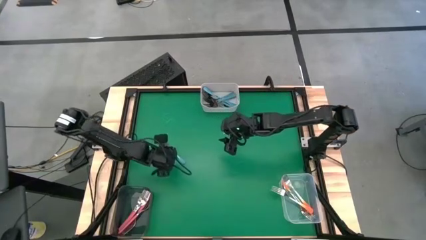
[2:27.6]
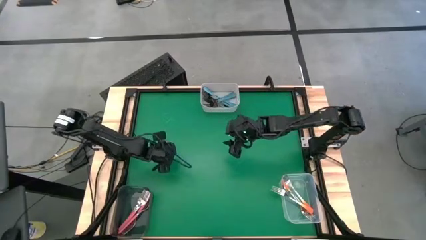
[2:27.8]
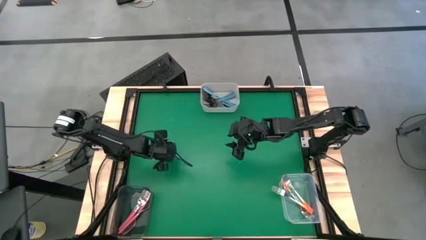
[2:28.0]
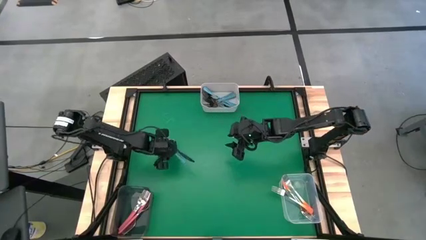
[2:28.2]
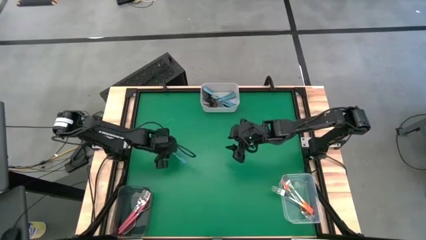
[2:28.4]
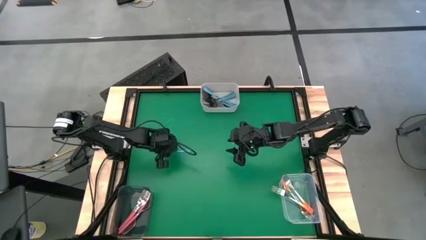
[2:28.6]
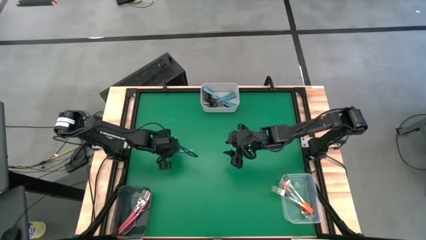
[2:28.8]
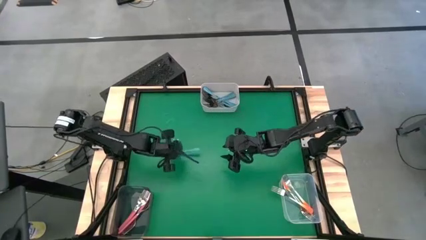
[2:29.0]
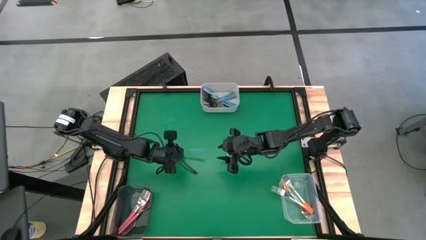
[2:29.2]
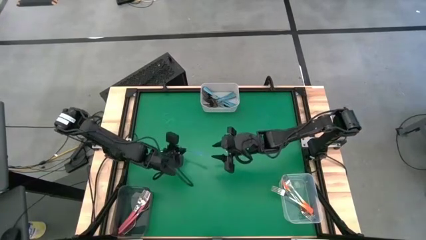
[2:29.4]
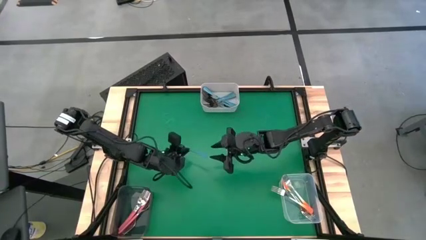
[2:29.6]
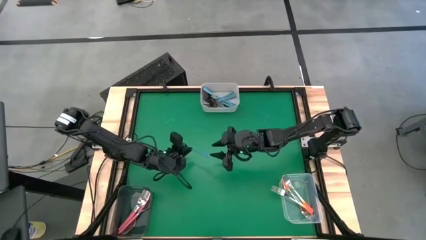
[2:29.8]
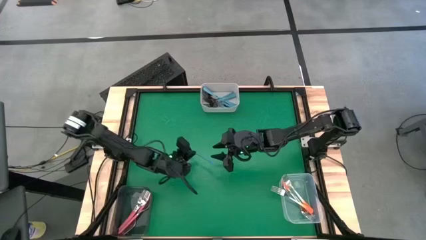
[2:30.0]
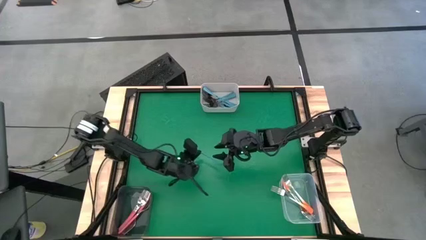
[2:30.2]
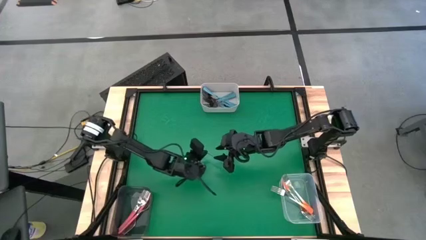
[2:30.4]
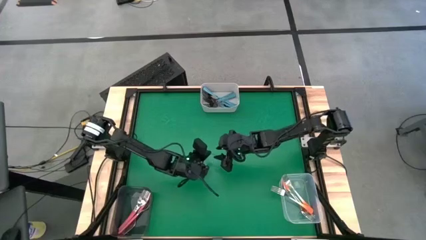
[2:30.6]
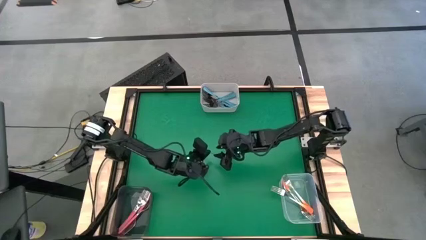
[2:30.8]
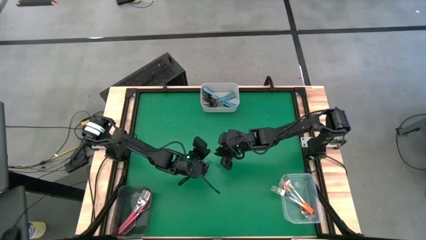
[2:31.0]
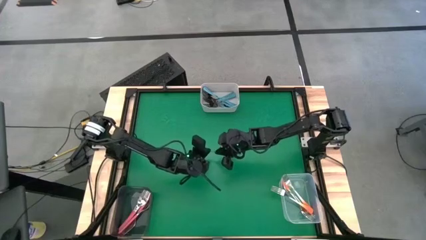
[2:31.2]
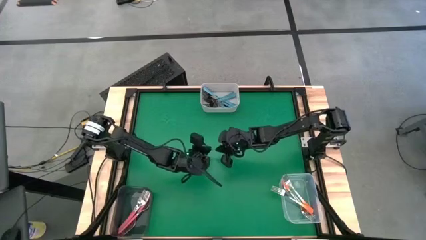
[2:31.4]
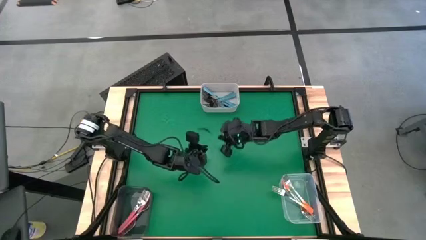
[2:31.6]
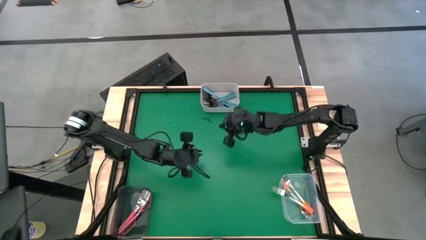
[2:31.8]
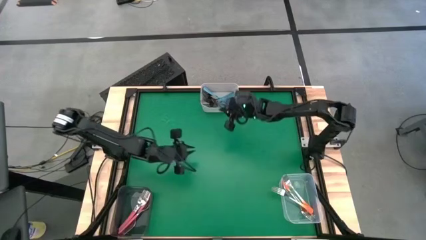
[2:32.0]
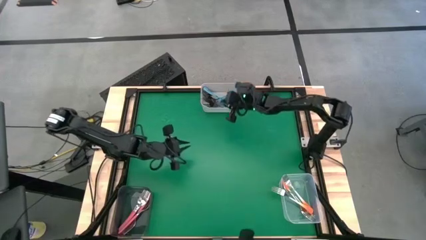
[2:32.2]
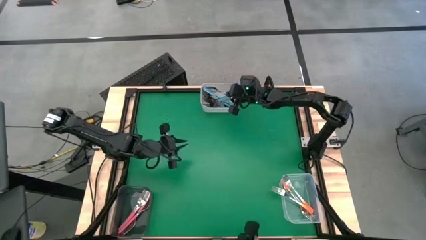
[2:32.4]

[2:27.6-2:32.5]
Task: Sort silverware by color (type)
Put the blue fork into the white bin

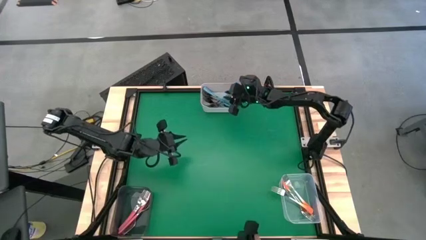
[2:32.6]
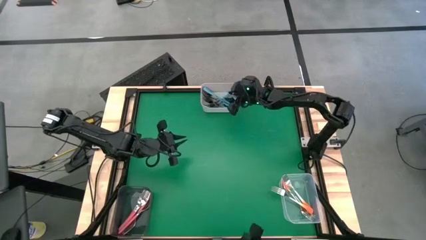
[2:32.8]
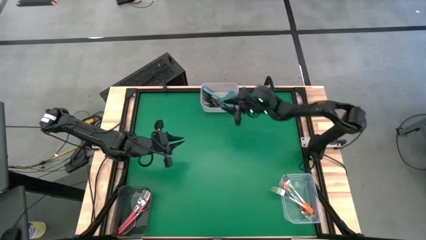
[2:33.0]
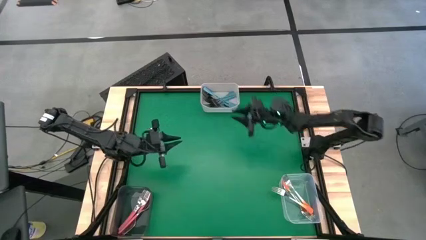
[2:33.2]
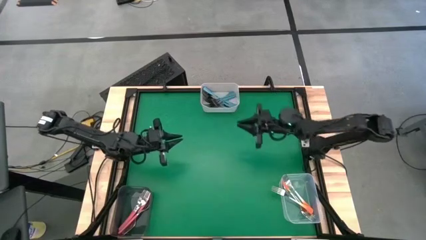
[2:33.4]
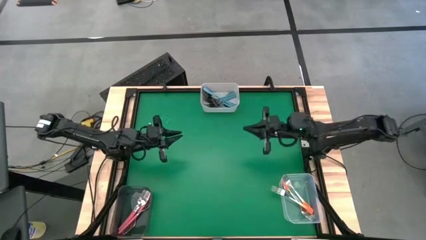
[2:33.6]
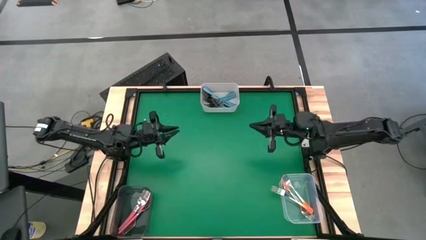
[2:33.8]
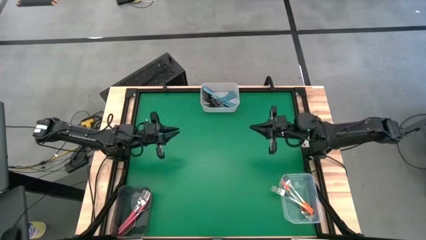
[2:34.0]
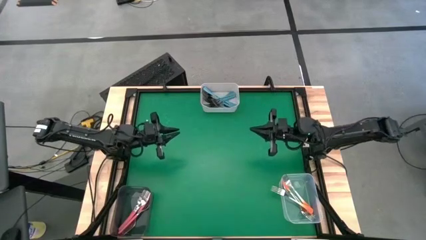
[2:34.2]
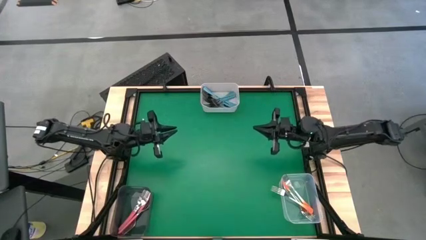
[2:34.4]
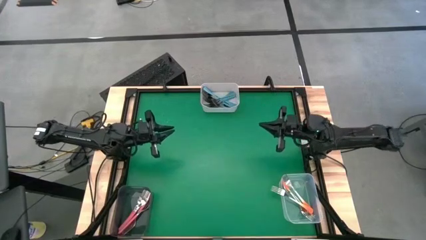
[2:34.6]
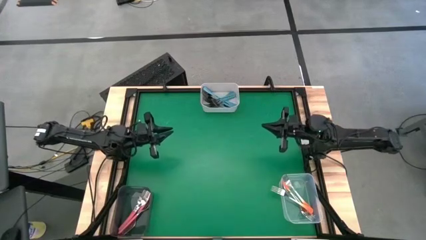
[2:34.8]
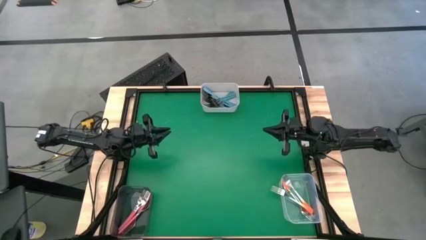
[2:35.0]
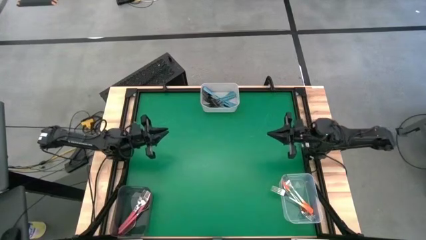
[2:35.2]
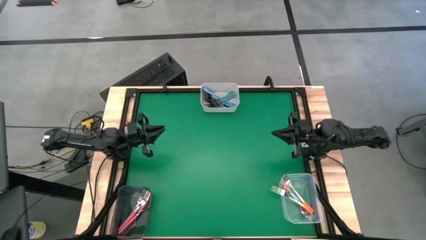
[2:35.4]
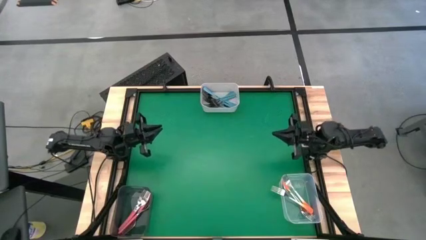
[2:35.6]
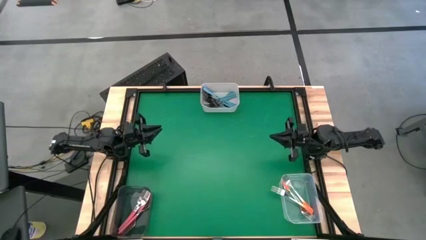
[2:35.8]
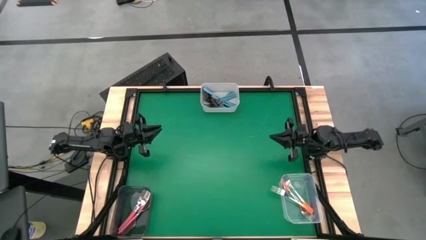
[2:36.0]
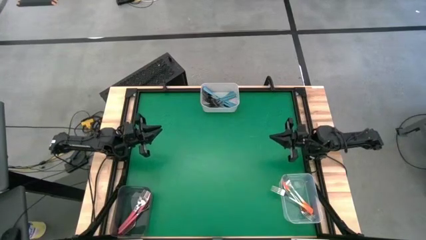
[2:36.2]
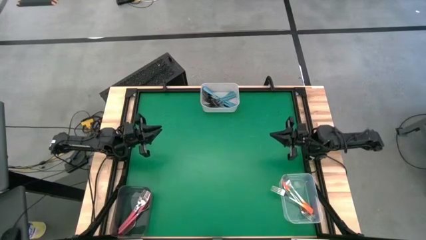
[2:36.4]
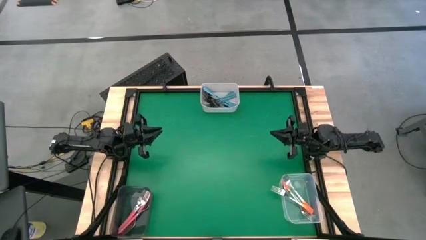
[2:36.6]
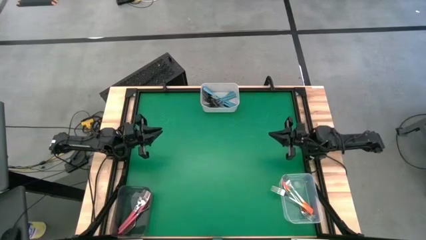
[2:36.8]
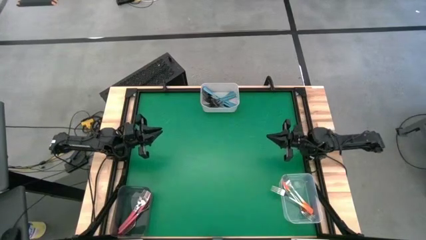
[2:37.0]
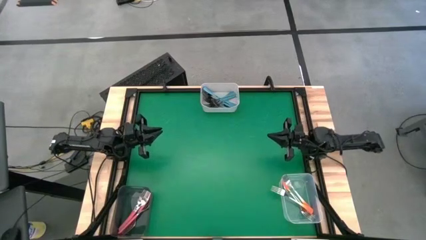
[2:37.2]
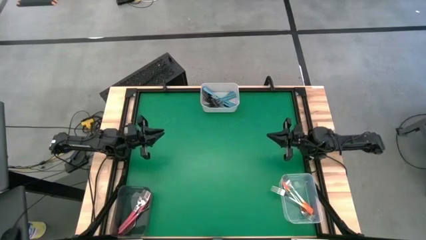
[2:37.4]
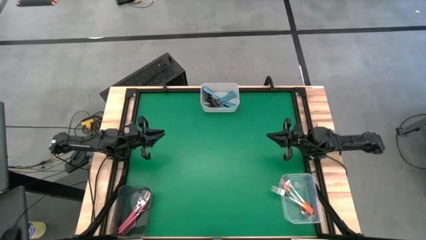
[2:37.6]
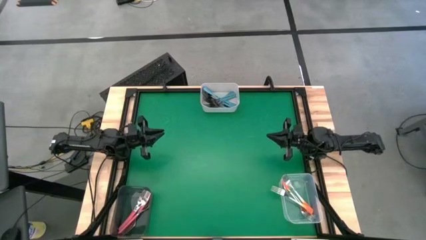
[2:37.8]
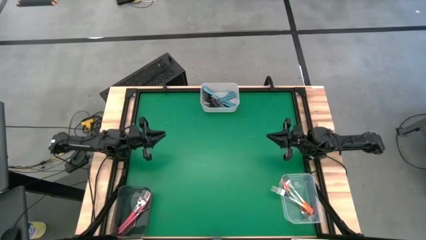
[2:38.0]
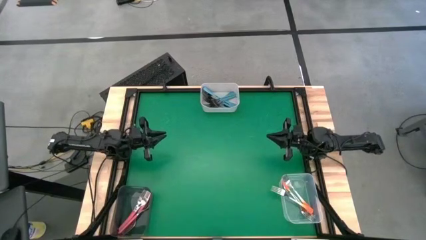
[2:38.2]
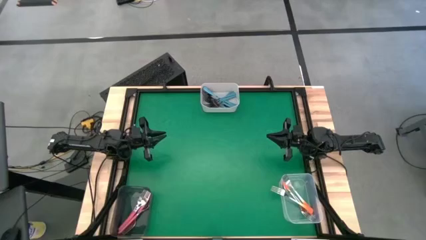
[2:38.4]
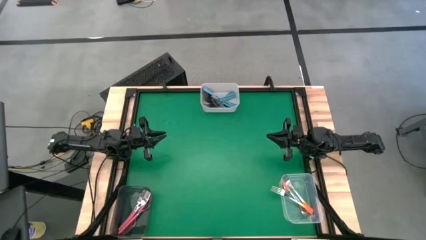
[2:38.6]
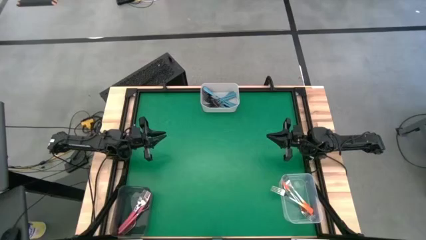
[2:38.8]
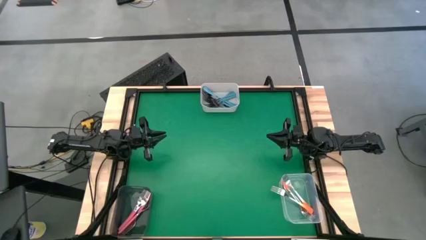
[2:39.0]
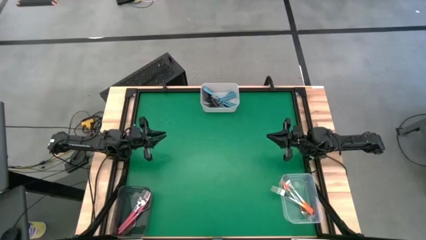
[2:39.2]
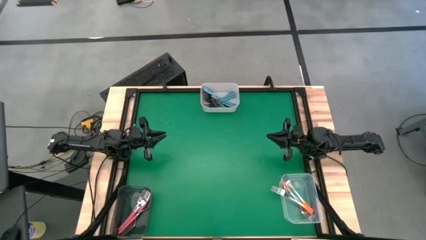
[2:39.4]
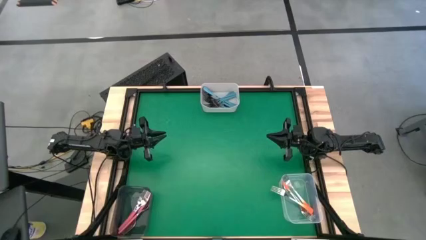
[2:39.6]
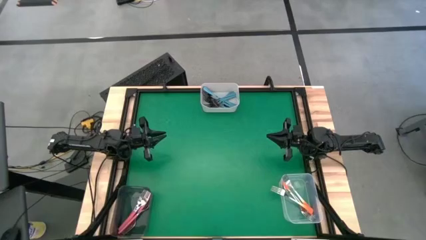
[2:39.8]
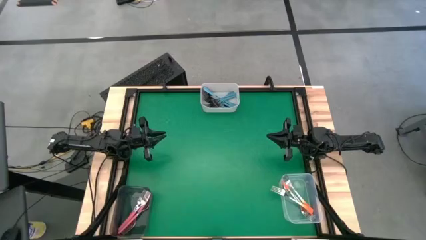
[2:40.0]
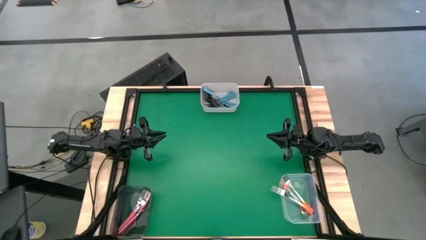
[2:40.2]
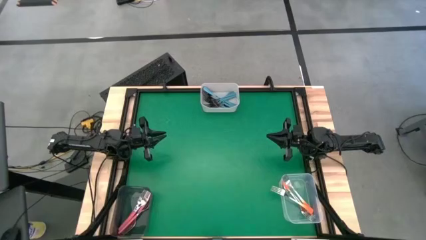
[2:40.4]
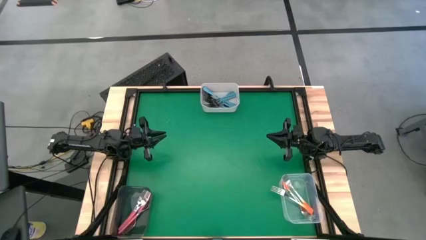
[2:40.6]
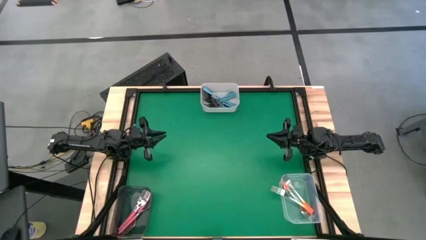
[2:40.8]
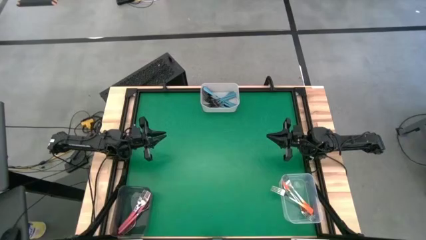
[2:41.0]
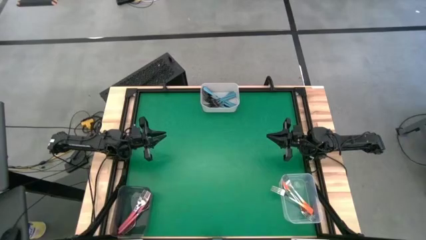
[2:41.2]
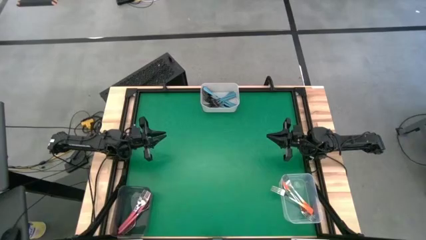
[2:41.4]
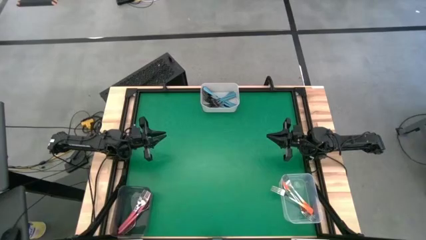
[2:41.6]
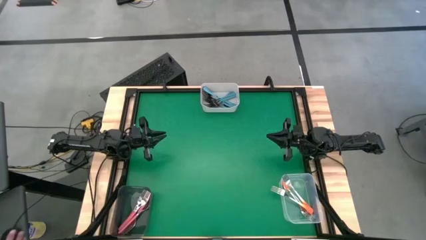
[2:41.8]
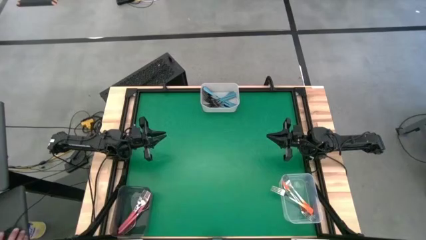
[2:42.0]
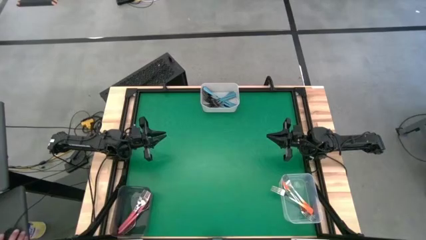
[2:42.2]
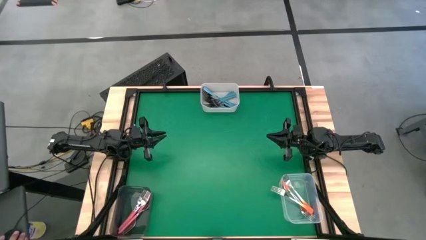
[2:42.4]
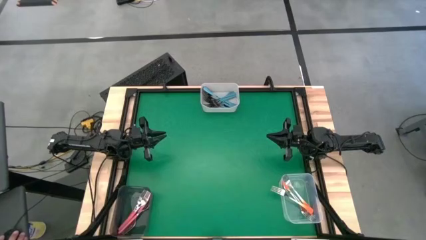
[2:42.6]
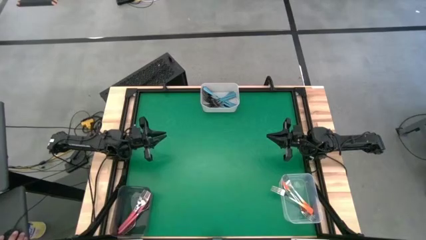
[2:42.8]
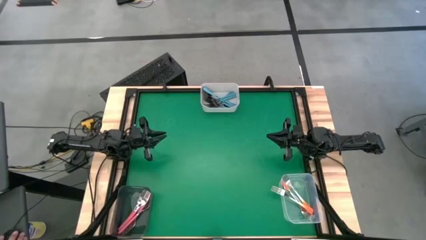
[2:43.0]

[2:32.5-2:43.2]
Return to Home Position

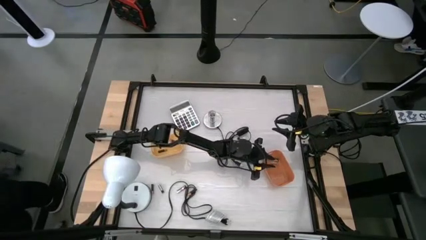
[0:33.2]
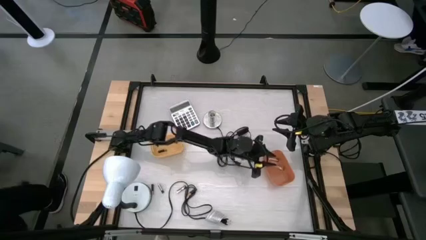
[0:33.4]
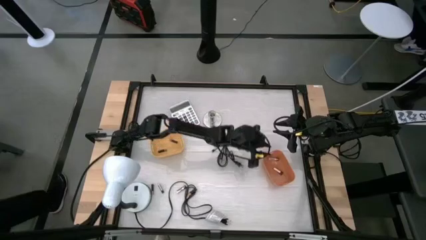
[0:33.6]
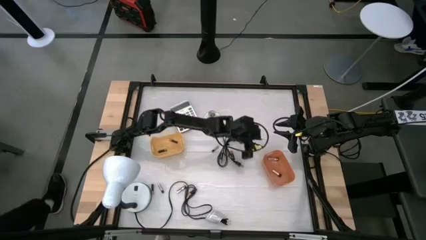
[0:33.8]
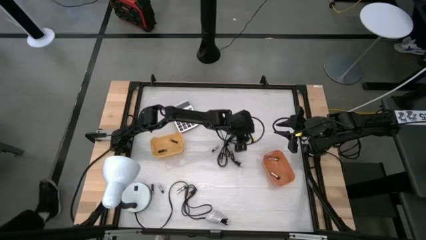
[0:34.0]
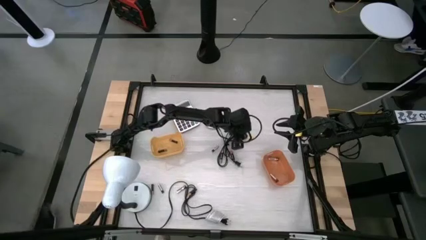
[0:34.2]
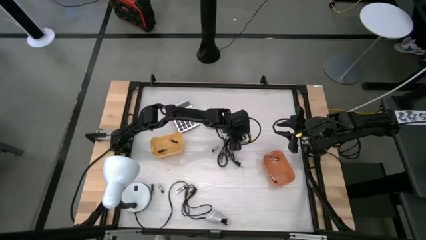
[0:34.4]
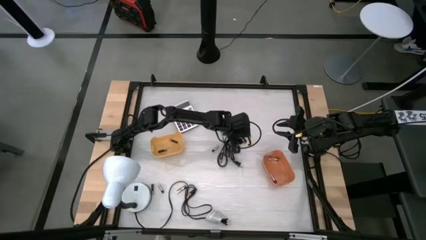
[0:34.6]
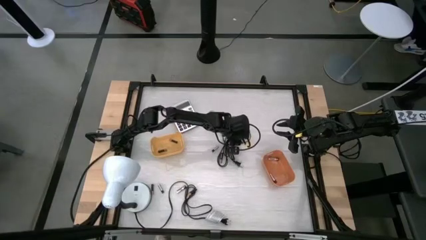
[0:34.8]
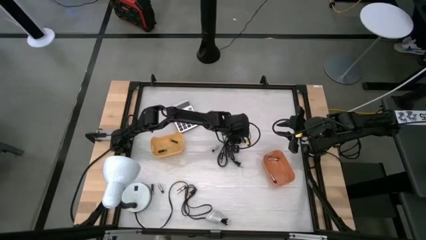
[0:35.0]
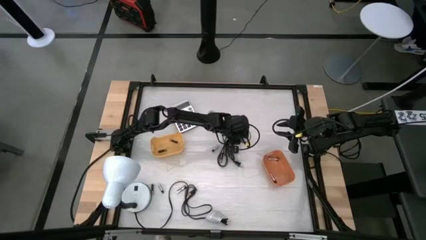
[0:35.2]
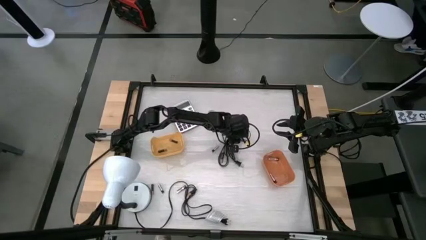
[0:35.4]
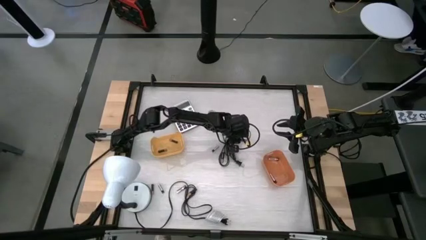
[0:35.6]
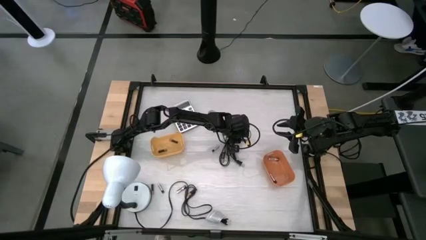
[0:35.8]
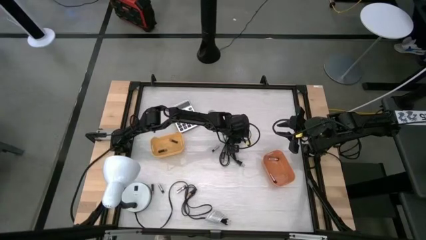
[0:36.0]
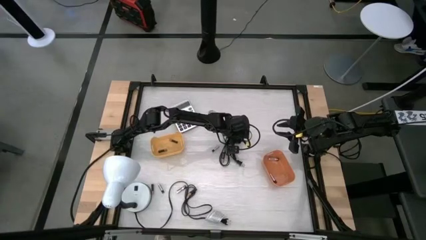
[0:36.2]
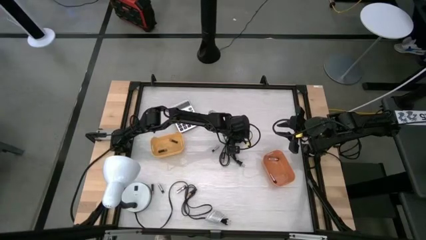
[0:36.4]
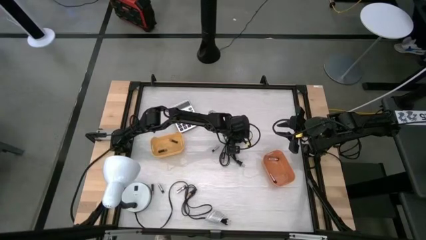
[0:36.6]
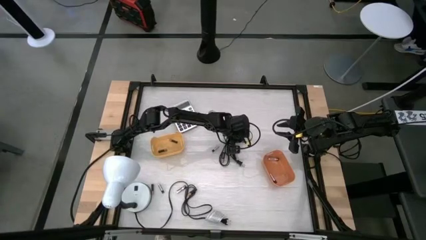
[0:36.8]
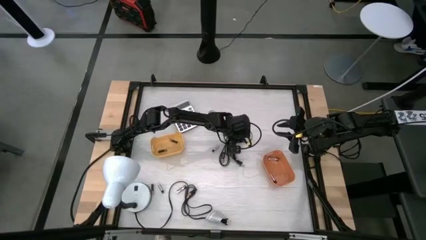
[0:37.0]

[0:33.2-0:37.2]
Task: Sort batteries
Put the silver battery into the orange bin
